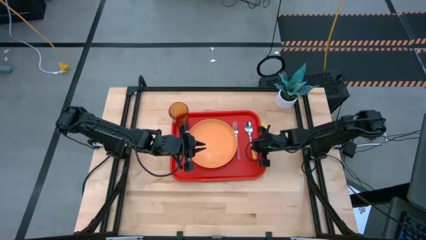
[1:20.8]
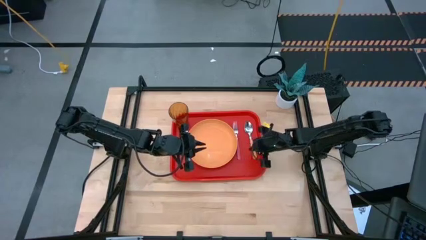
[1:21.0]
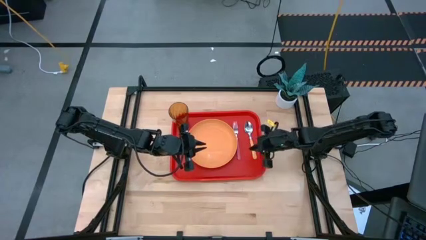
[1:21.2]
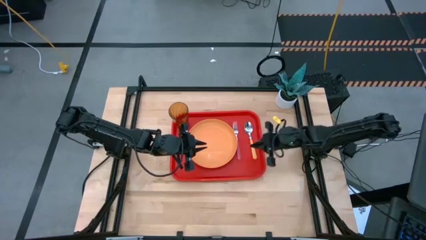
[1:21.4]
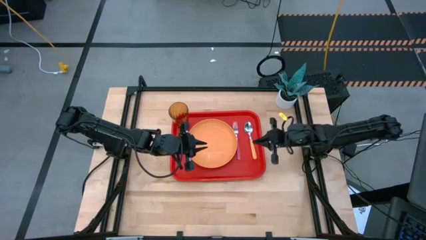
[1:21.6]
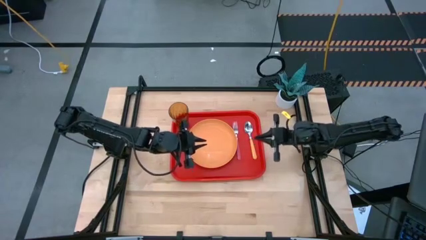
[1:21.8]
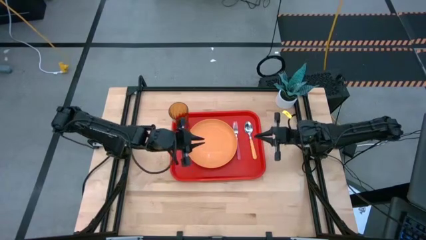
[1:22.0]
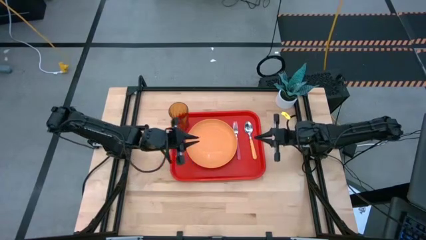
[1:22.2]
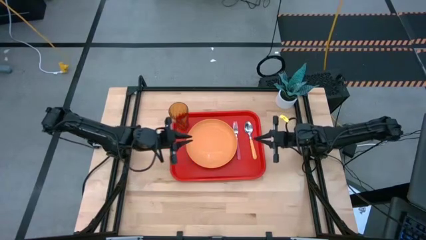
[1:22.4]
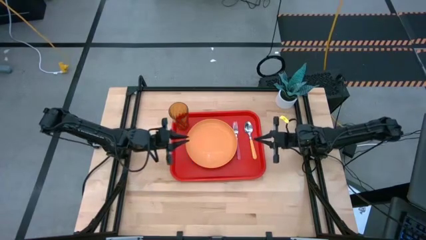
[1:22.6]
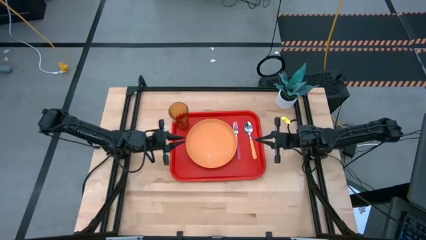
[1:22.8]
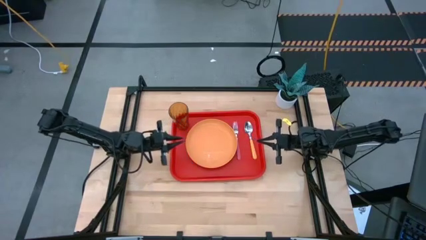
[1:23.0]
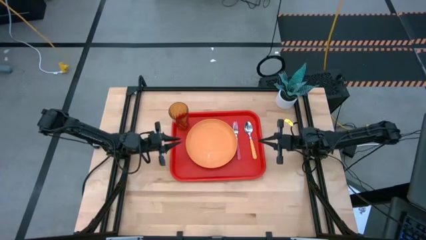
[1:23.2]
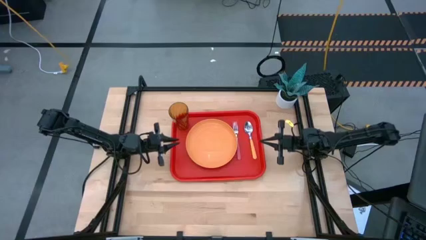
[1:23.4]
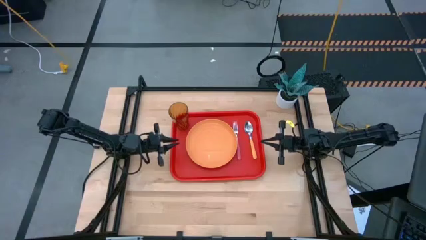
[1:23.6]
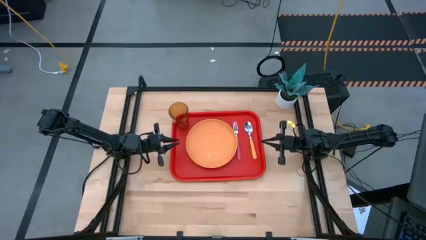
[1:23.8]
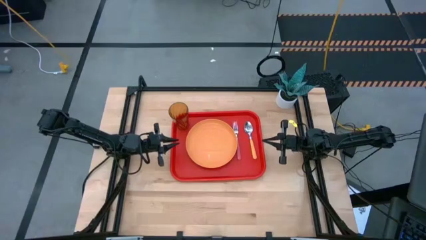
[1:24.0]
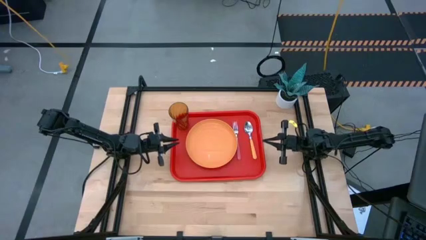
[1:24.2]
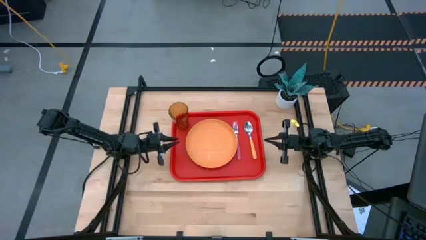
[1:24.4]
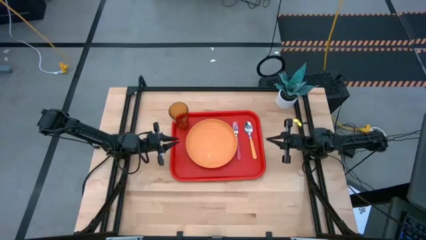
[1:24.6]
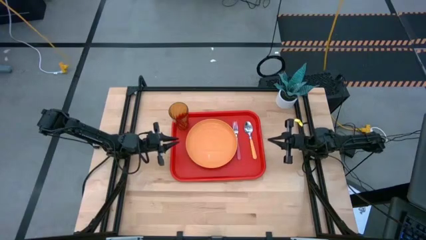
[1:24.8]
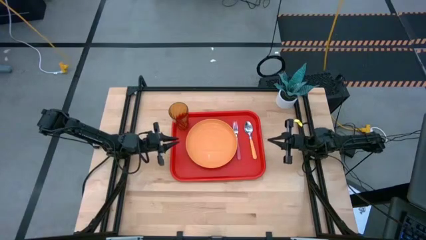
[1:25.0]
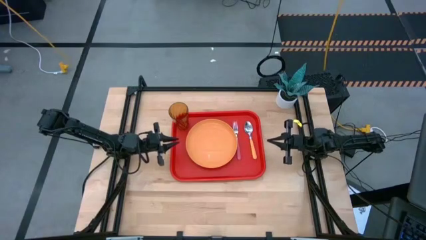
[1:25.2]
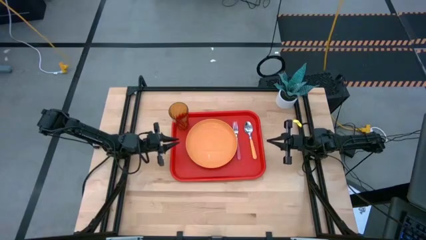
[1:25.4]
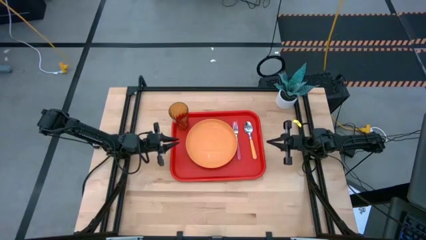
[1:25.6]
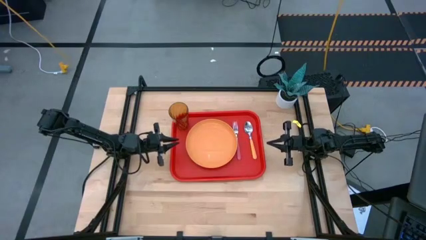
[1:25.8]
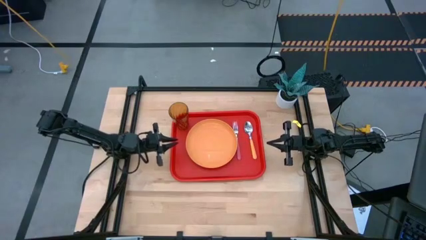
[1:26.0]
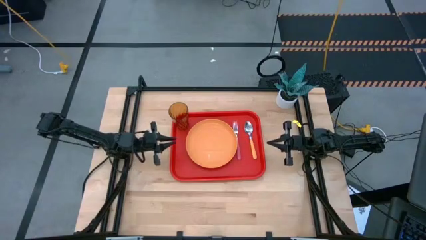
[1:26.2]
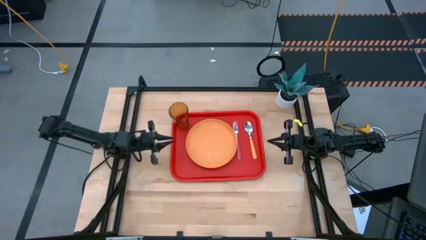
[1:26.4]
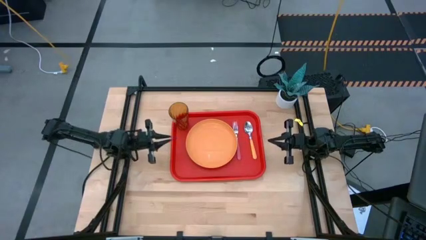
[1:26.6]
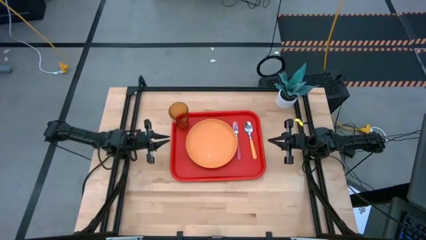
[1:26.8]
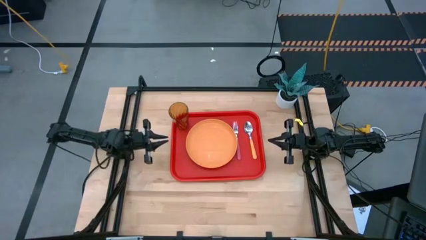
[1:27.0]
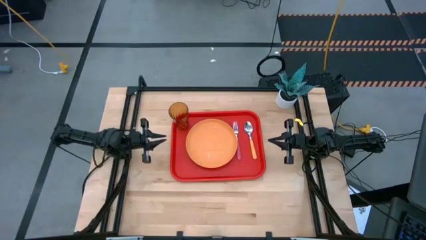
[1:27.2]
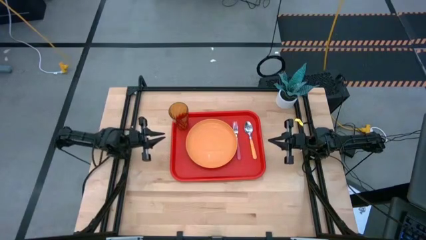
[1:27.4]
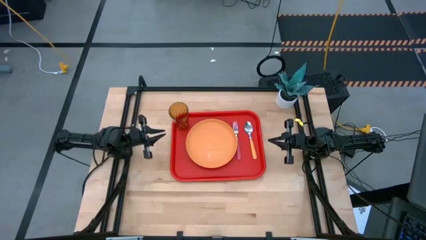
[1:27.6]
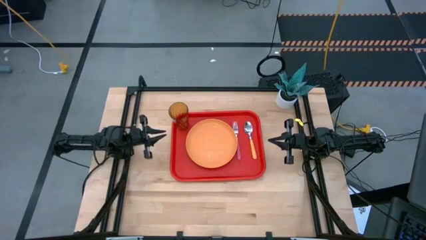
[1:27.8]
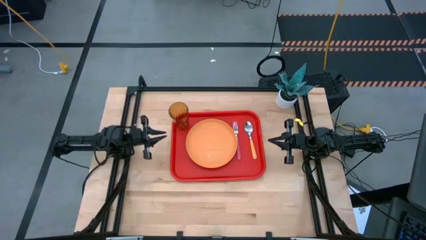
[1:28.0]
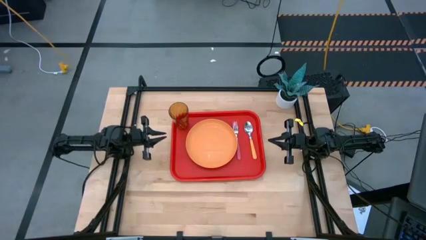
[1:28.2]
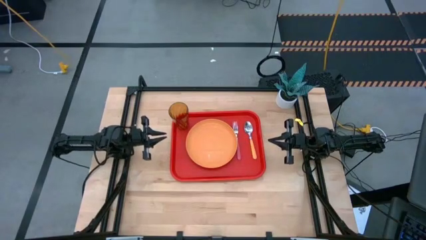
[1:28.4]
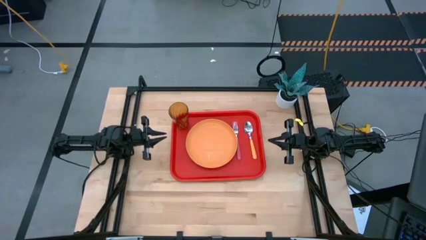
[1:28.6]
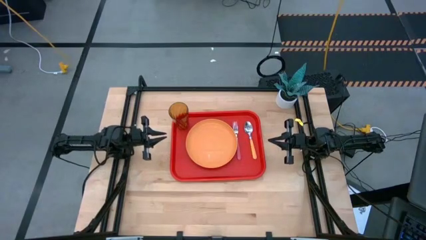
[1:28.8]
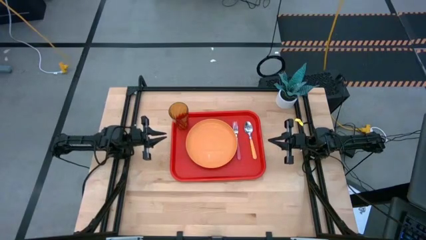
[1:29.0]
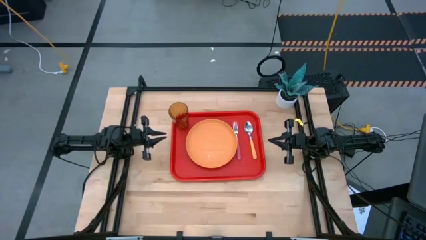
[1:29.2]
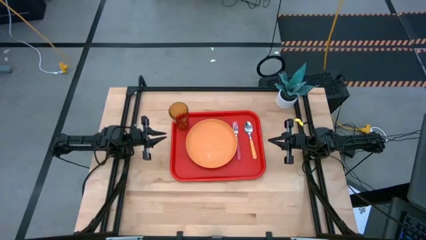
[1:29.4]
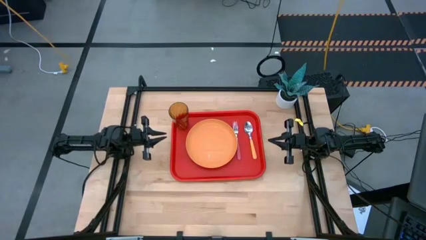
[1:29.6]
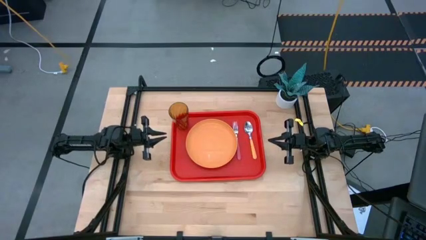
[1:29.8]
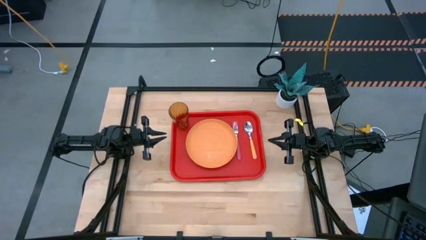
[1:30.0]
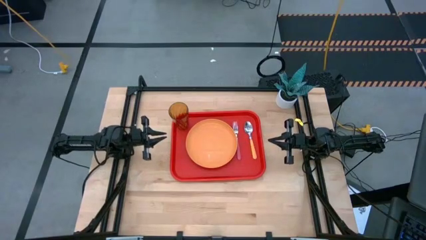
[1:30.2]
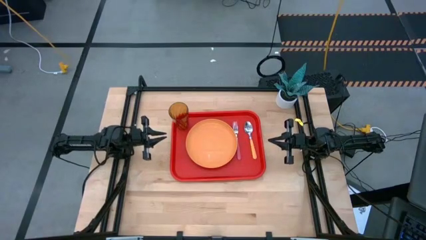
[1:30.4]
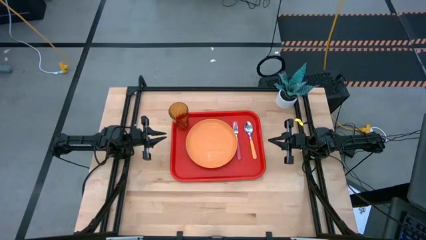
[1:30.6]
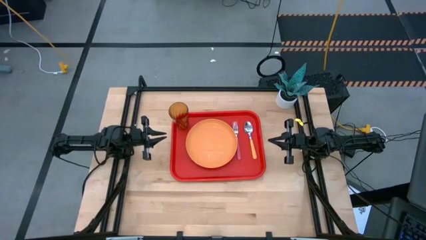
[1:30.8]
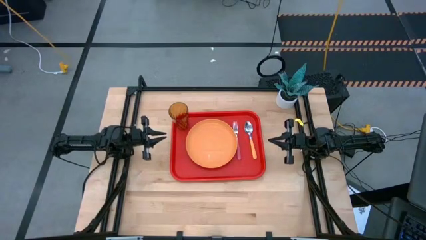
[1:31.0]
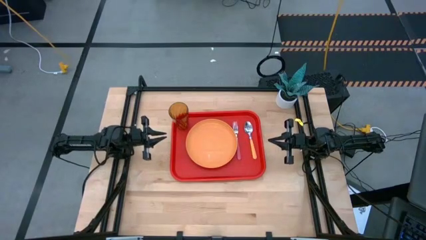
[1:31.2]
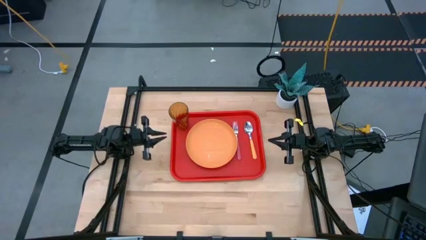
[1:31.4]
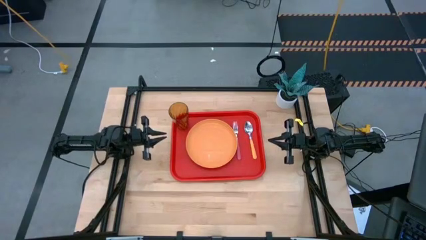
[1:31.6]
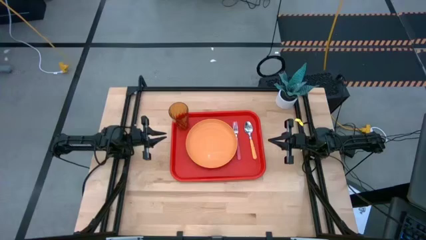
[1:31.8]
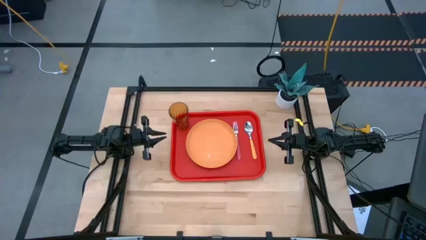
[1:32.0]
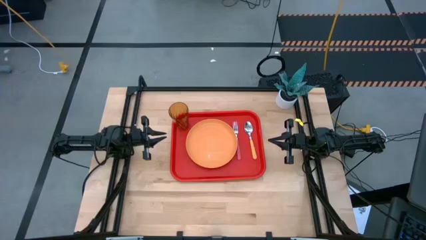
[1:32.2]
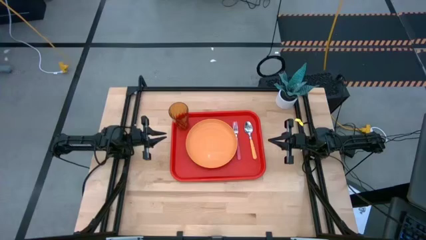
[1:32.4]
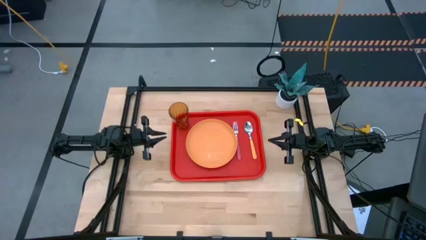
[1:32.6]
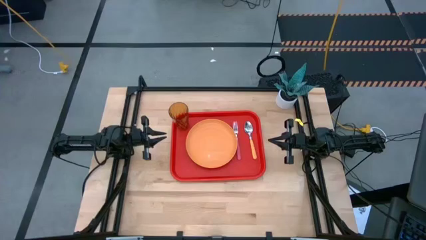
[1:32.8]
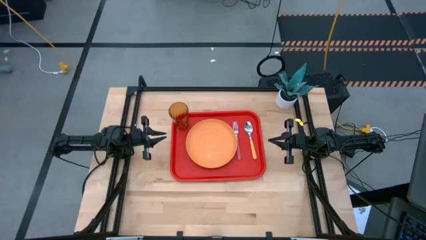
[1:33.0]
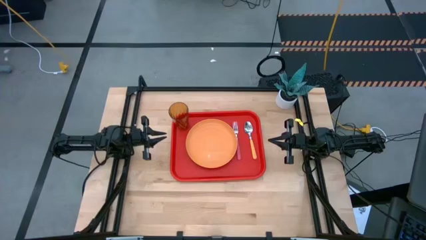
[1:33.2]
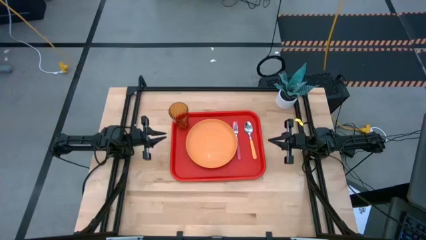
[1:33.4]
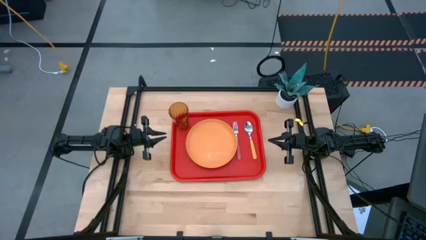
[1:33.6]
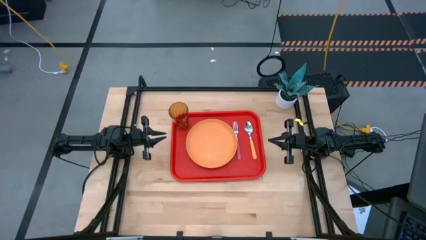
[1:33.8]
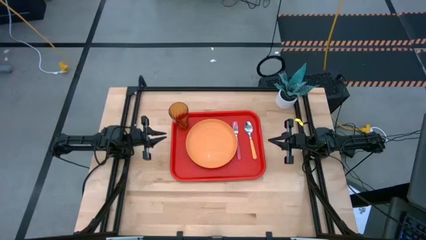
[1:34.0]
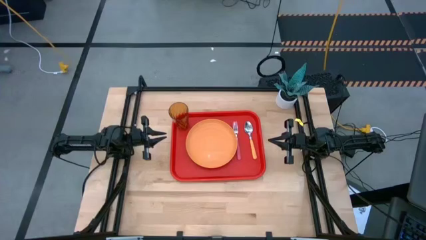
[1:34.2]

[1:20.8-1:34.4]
Task: Pick and place plate/cup/fork/spoon on tray
Return to Home Position

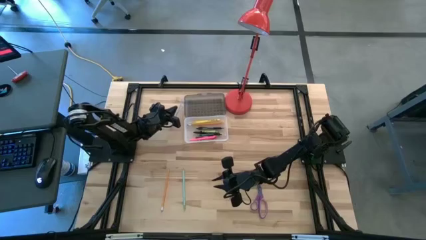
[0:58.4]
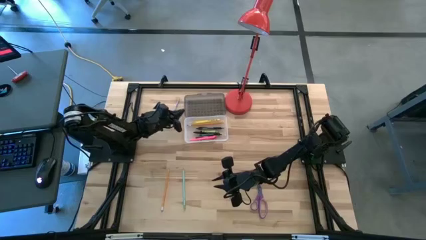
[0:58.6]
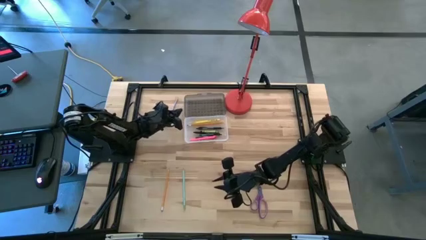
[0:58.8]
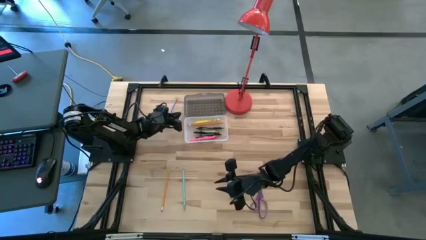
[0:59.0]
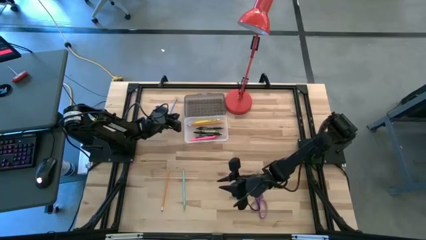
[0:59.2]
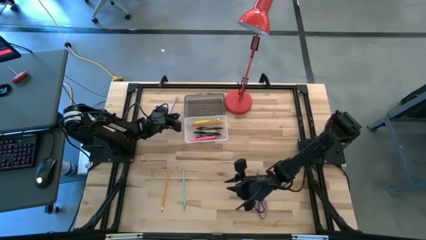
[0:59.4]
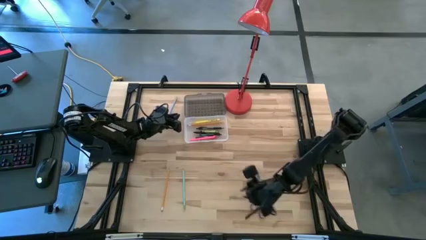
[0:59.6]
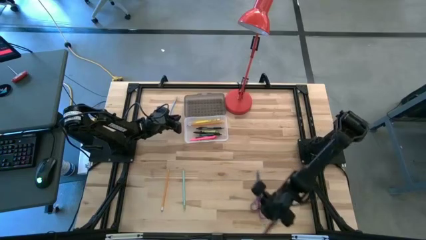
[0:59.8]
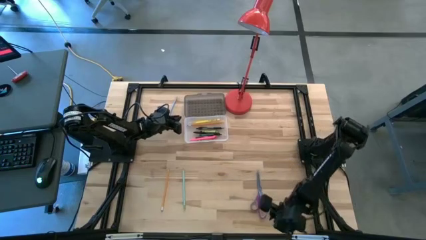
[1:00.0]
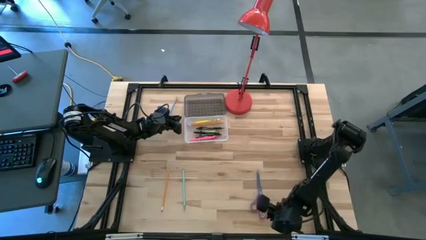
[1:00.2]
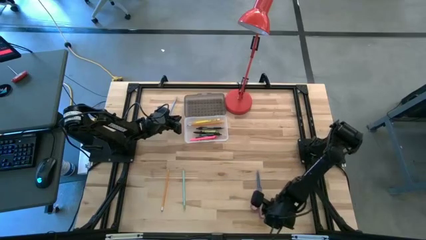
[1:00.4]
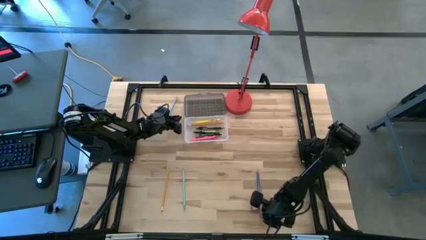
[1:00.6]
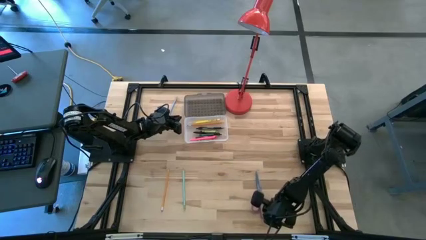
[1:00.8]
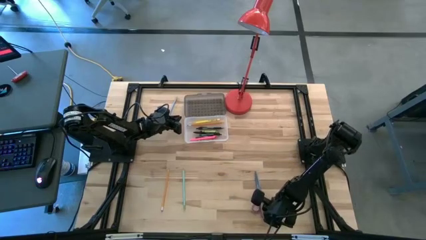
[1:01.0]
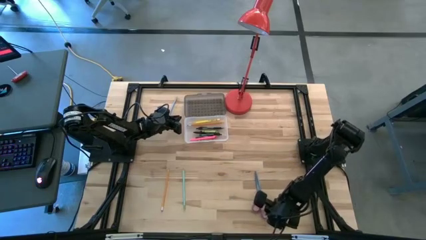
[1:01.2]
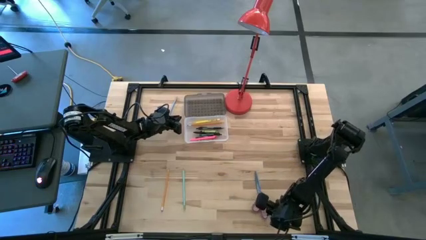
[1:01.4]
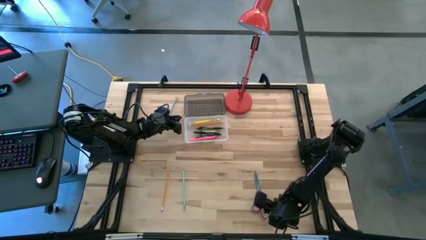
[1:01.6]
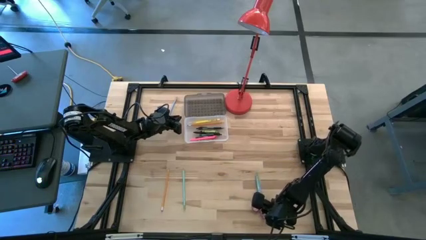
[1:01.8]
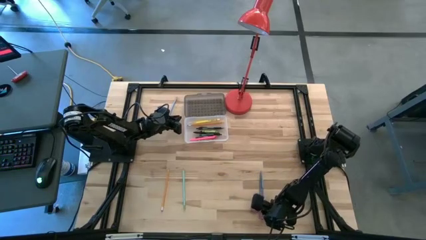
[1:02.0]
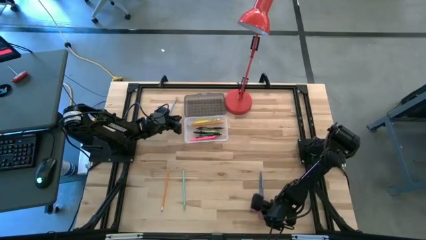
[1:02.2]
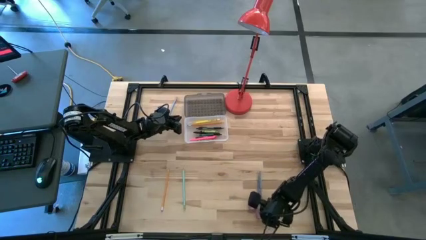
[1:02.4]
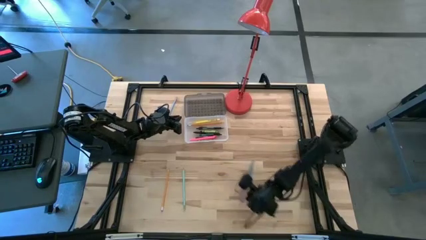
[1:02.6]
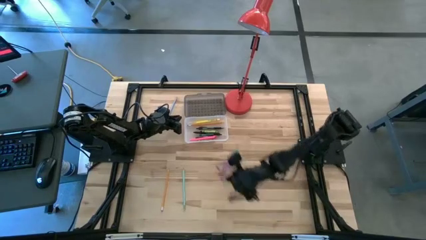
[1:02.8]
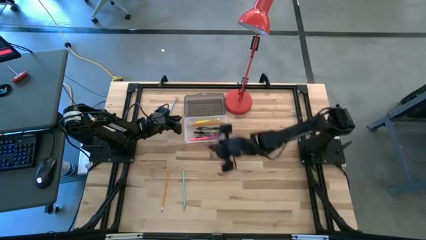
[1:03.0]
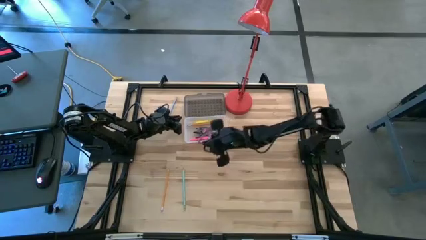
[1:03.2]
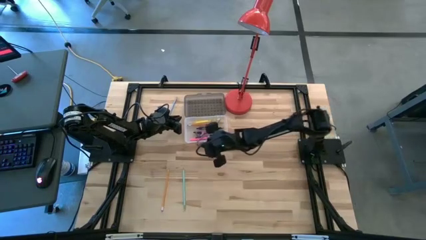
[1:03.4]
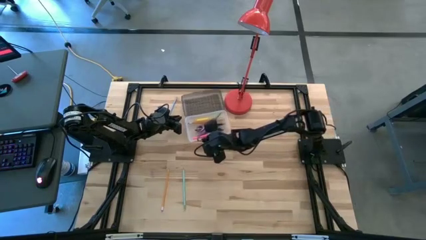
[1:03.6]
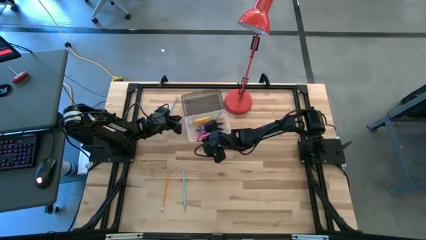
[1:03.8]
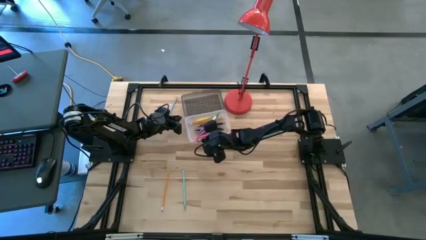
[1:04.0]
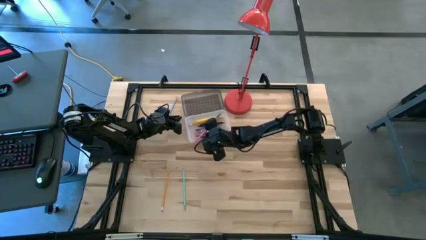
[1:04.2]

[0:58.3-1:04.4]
Task: Pick & place school supplies into a supply box
Put the purple scissors into the black supply box
